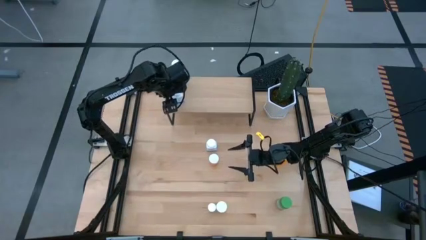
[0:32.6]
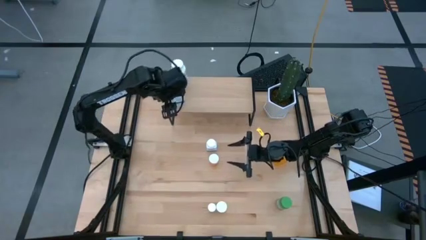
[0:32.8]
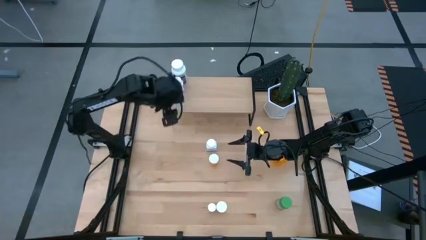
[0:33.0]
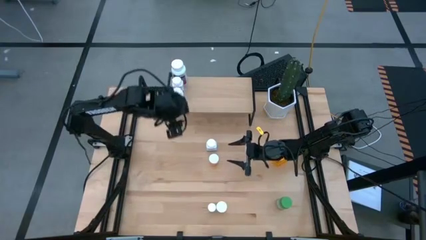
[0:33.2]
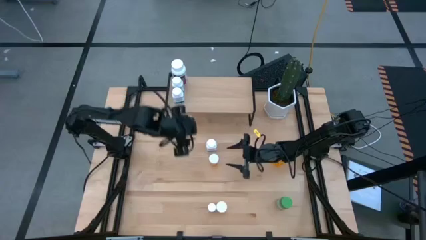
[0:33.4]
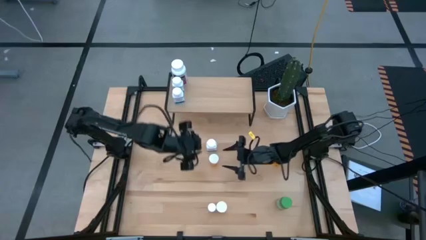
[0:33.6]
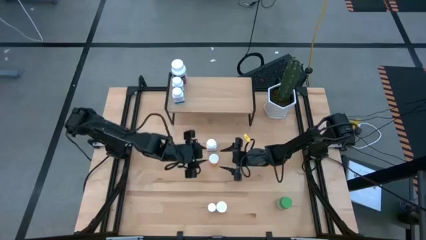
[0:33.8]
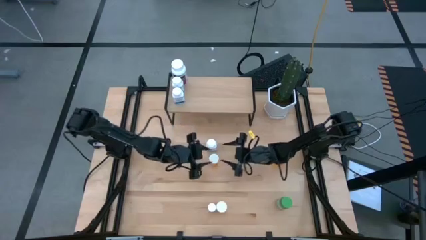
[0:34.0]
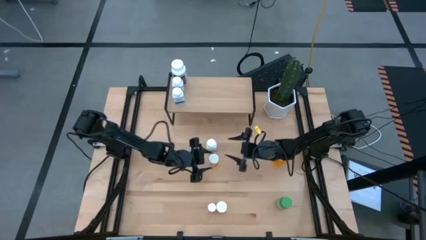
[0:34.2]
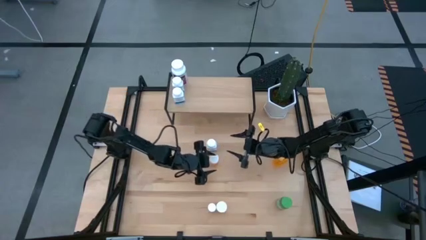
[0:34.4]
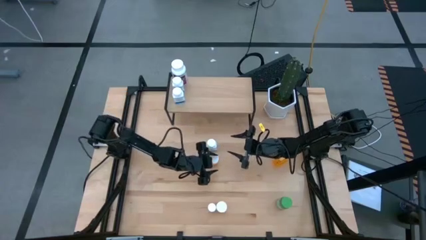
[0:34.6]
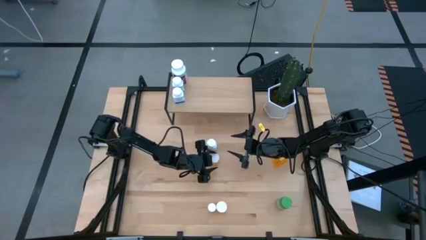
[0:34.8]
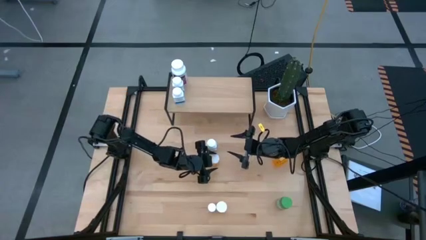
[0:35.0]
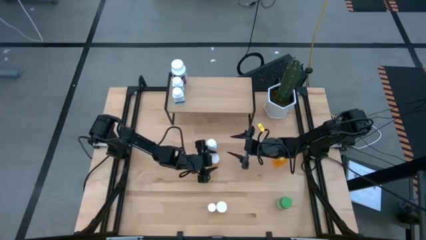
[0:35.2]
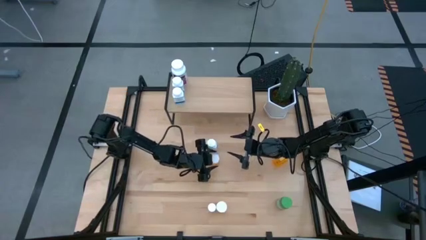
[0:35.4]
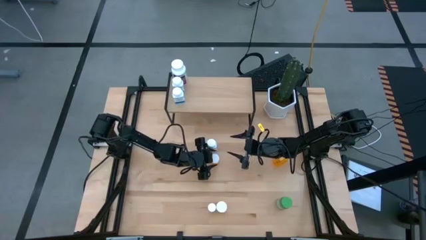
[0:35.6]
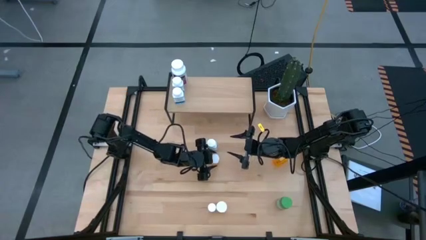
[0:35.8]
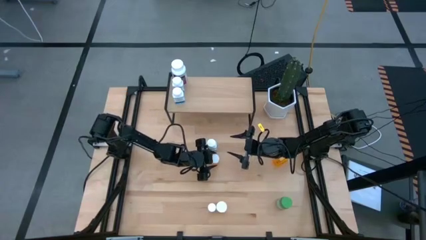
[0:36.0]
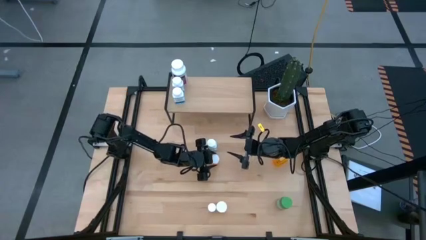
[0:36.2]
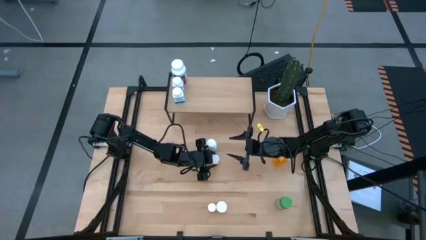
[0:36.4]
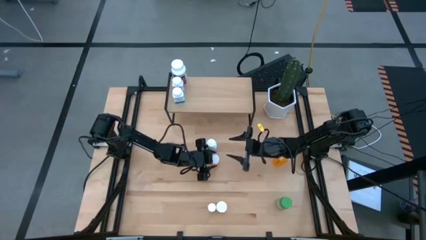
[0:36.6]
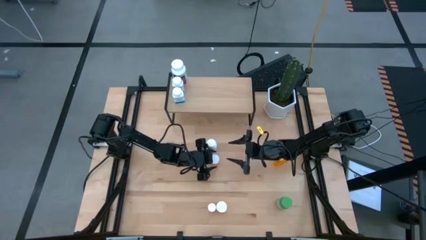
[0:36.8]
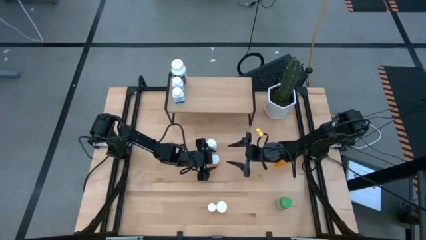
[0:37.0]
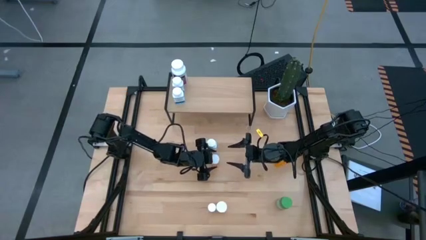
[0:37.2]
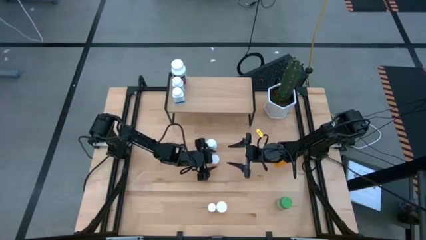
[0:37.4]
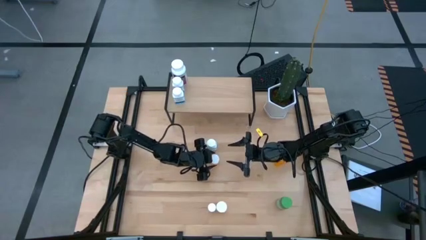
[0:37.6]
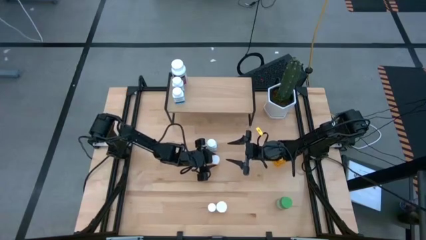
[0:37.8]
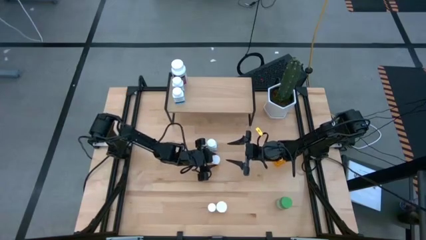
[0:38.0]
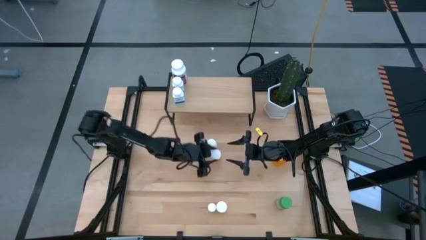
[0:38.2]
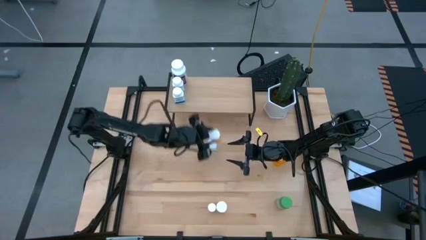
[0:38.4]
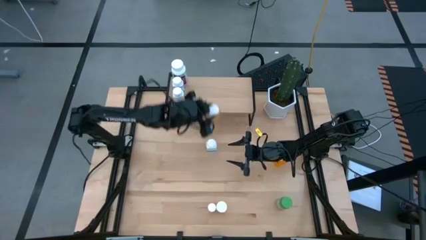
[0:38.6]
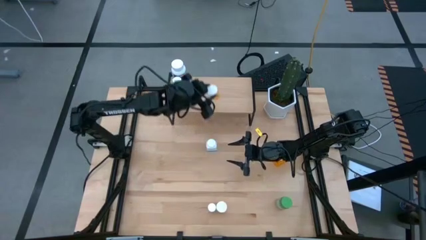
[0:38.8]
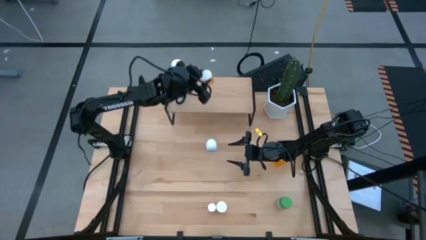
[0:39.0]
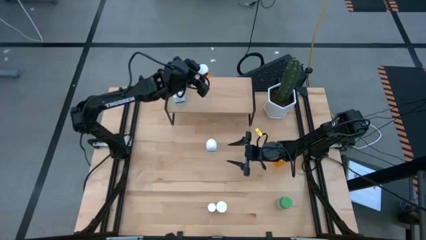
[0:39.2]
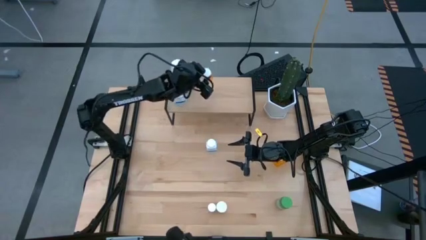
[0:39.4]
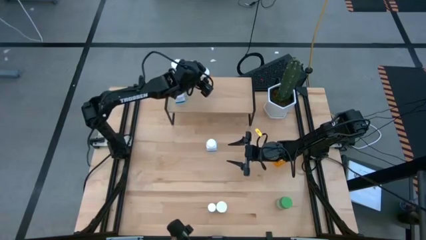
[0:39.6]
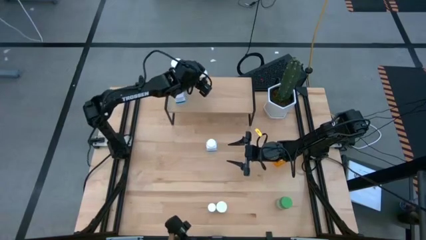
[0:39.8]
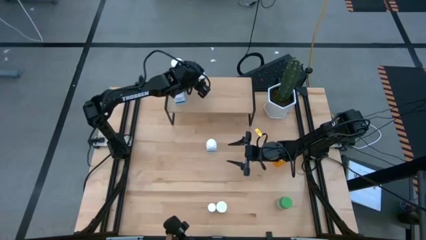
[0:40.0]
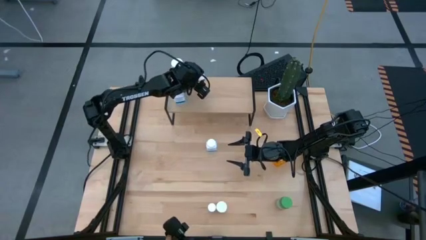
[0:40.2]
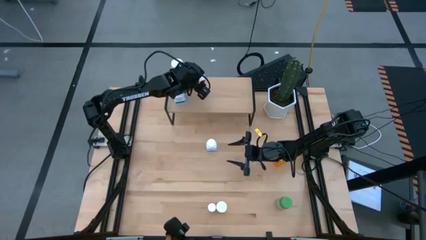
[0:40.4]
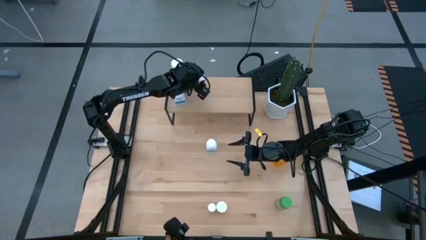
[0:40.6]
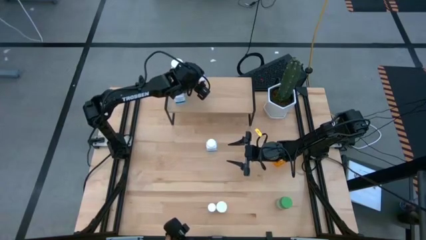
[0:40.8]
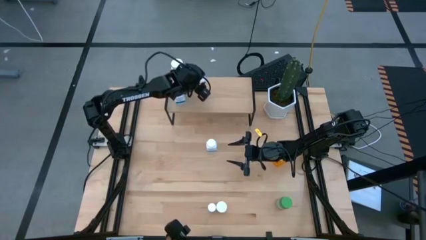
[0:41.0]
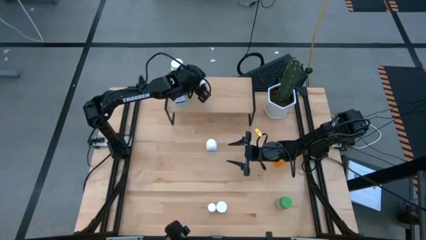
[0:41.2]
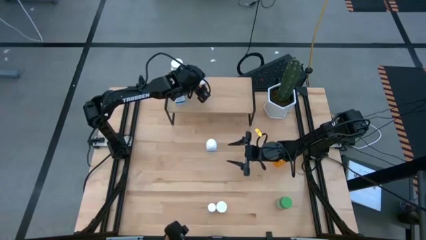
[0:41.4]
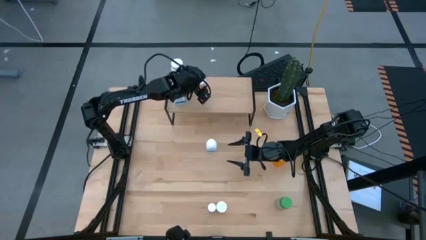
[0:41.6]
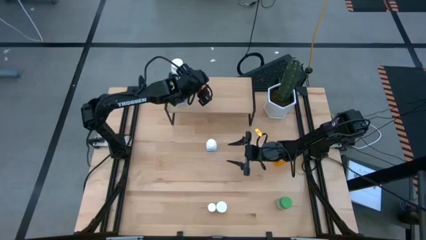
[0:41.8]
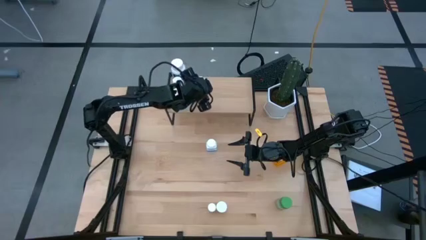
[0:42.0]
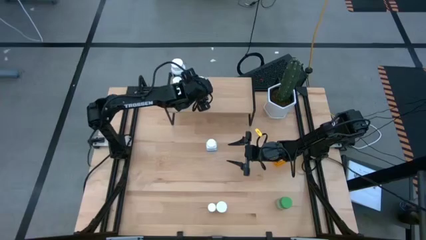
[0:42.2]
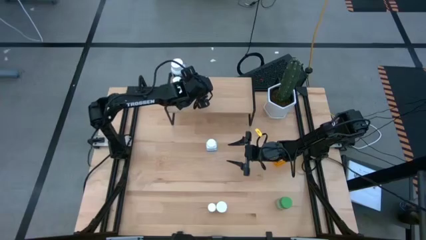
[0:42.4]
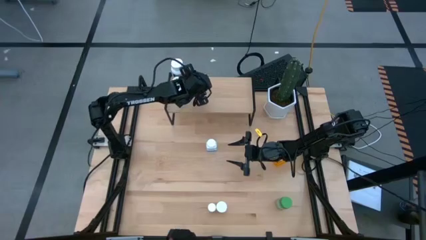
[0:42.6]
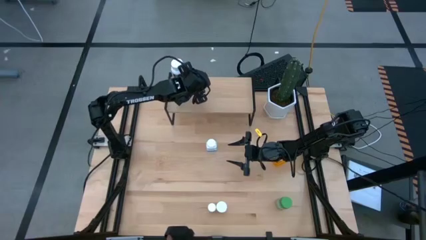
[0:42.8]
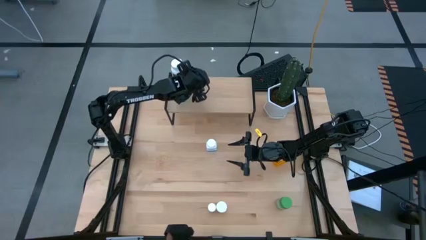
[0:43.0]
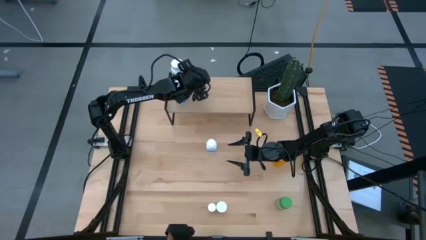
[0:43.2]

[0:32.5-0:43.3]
Task: Pick and place medicine bottles onto shelf by color
Put the top left orange pill bottle on the shelf

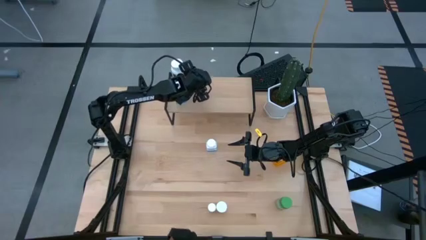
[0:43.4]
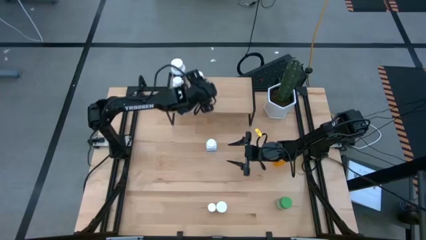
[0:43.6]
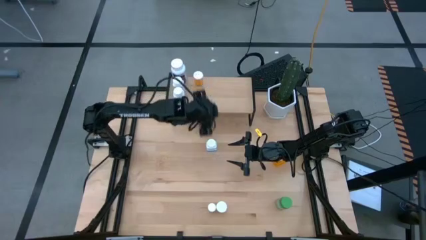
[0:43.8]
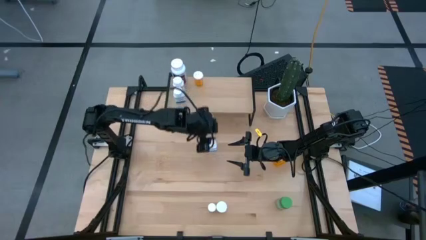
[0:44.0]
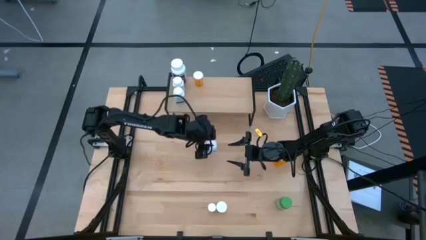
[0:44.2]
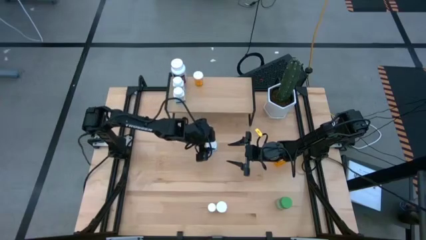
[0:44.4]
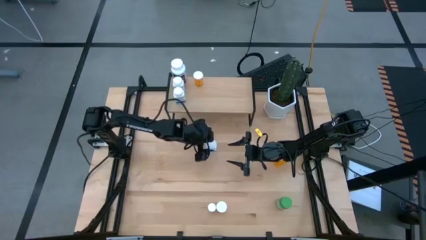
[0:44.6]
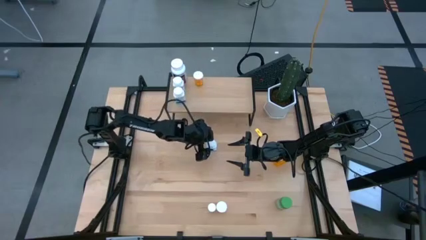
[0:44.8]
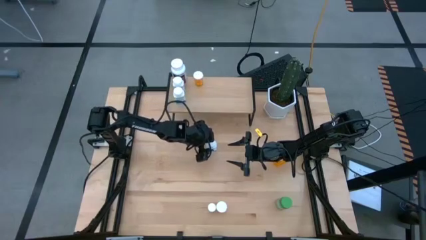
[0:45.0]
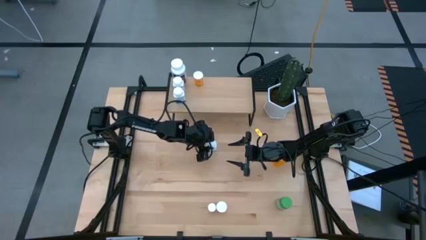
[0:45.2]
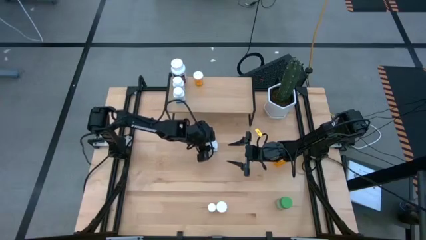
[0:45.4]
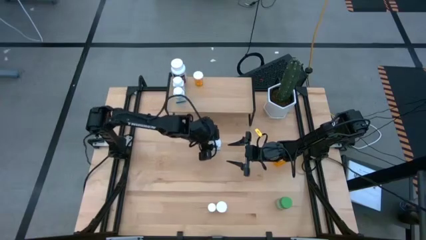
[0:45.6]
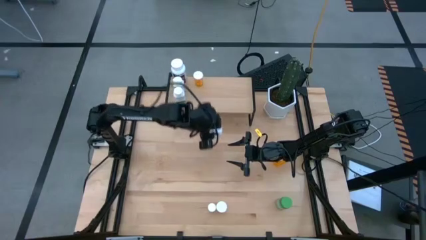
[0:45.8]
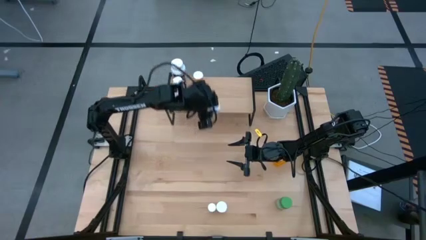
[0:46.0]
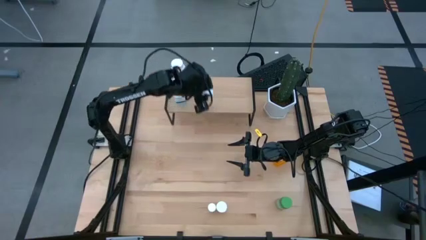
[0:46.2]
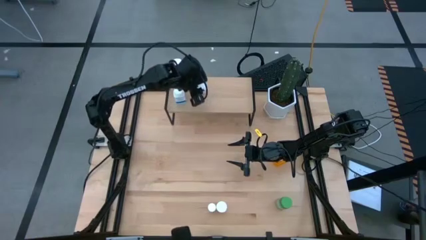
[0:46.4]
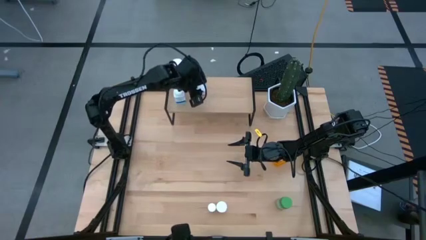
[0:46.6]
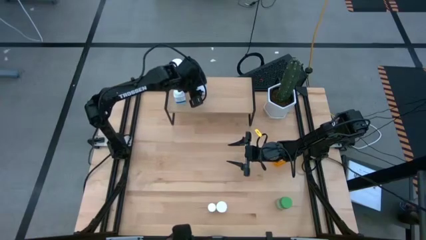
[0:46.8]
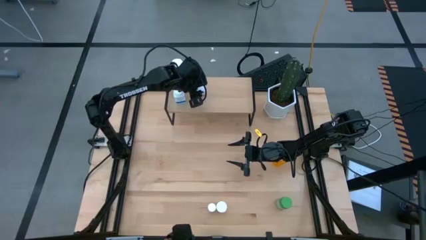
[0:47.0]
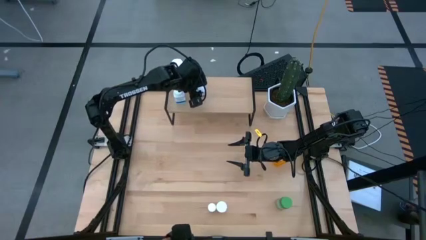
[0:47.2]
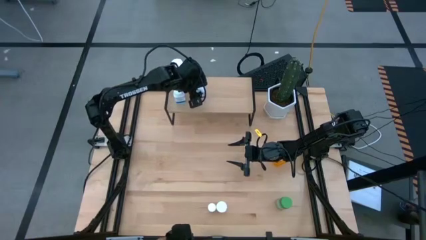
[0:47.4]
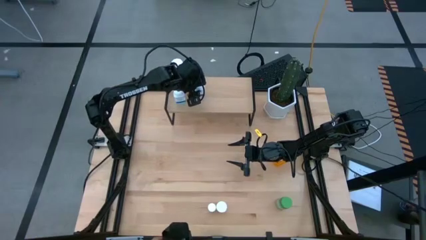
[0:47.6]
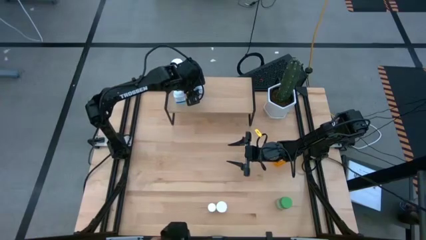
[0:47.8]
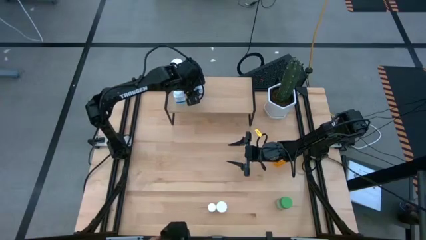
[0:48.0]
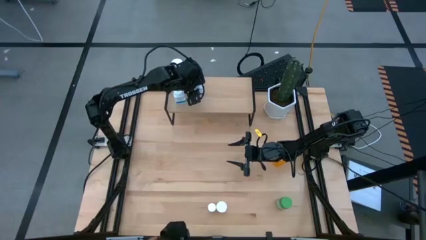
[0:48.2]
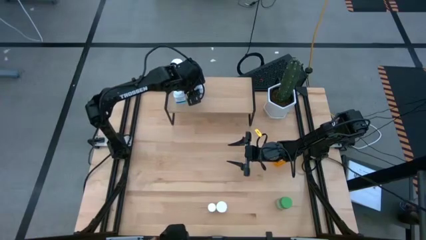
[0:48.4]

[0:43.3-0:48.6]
Put the white blue pill bottle on the shelf
